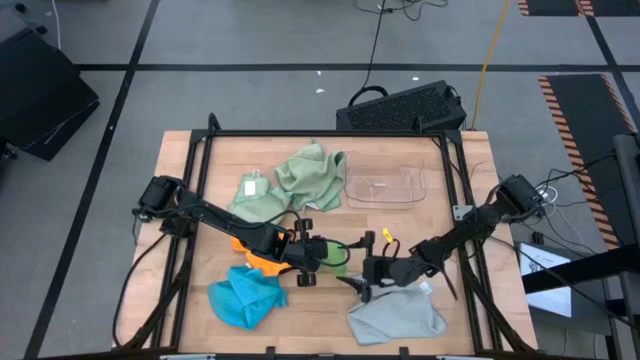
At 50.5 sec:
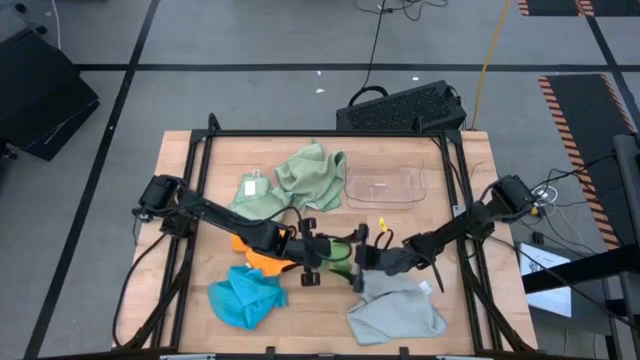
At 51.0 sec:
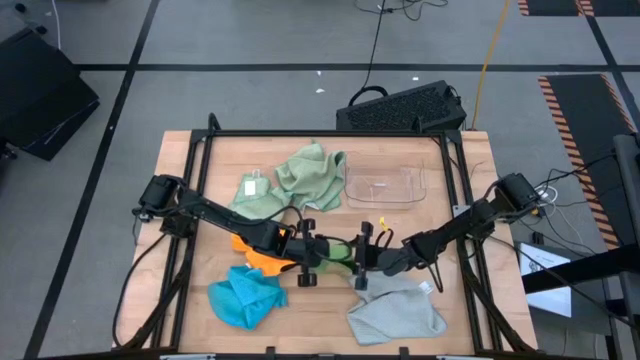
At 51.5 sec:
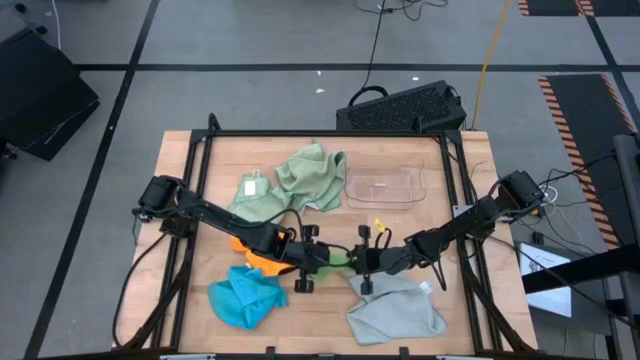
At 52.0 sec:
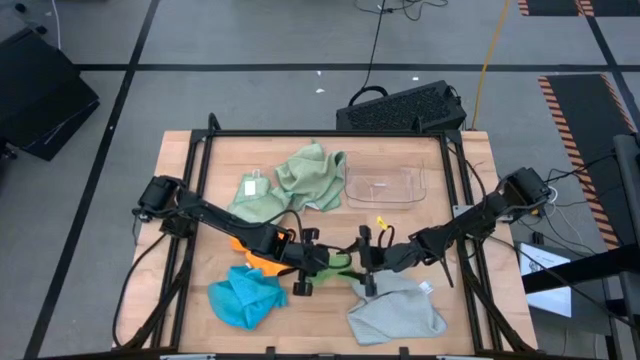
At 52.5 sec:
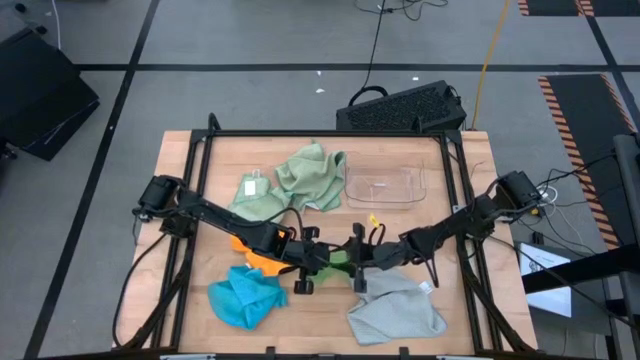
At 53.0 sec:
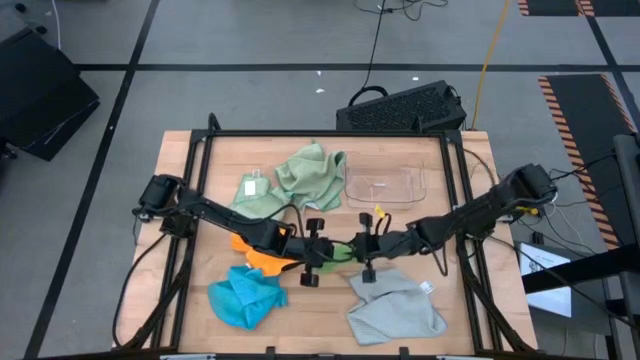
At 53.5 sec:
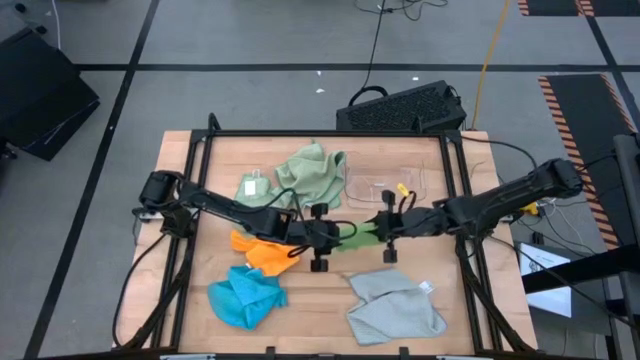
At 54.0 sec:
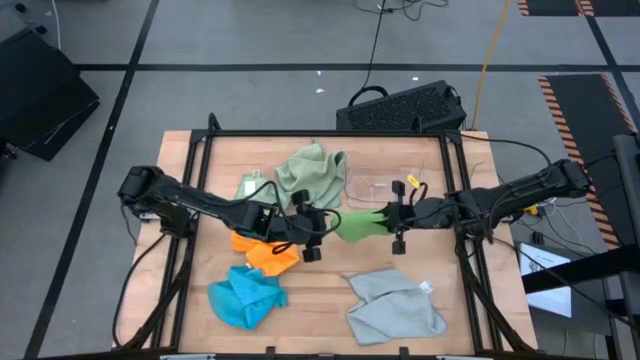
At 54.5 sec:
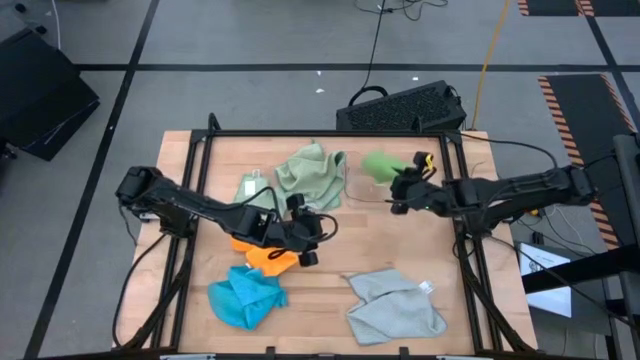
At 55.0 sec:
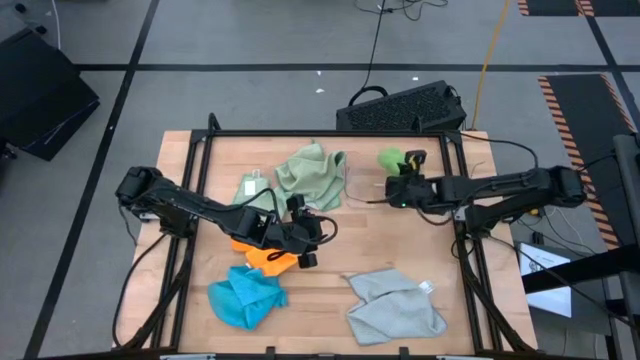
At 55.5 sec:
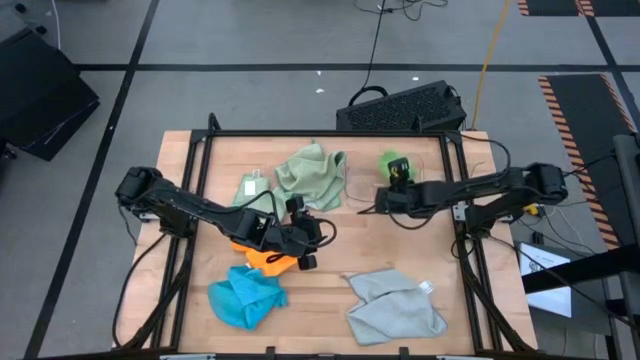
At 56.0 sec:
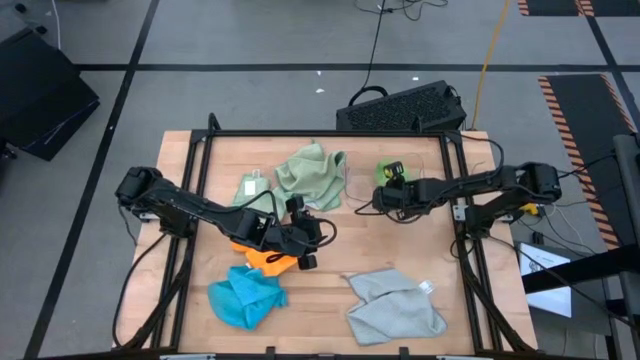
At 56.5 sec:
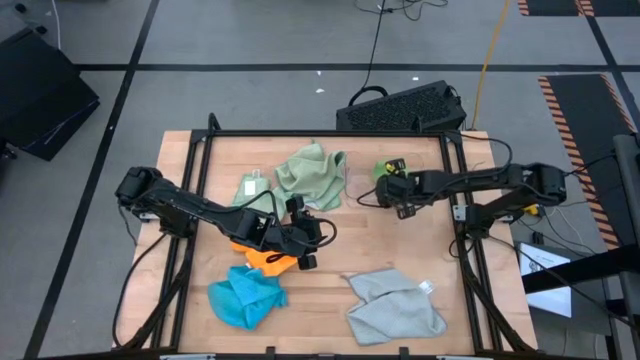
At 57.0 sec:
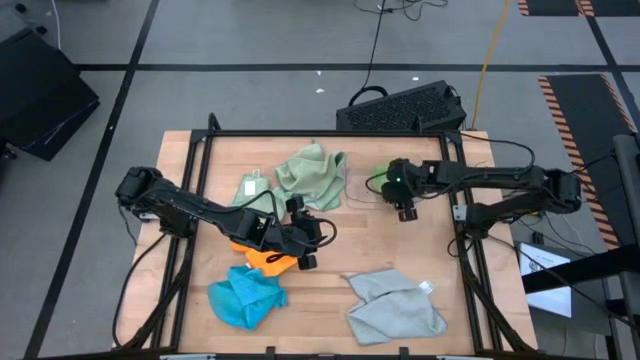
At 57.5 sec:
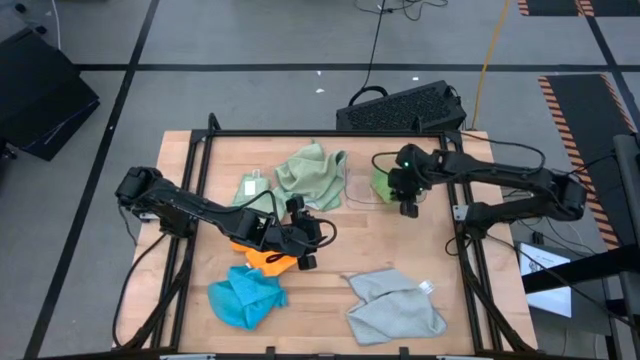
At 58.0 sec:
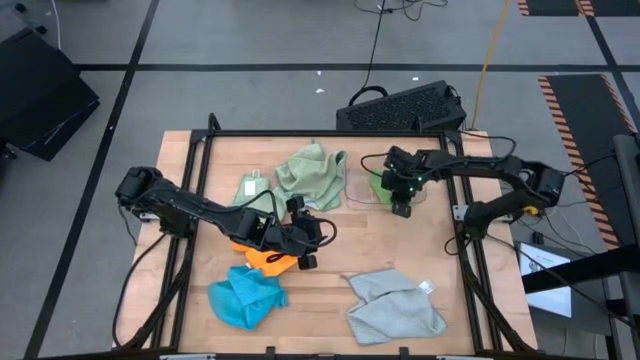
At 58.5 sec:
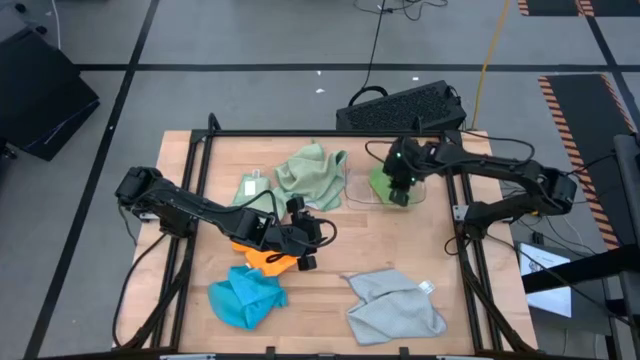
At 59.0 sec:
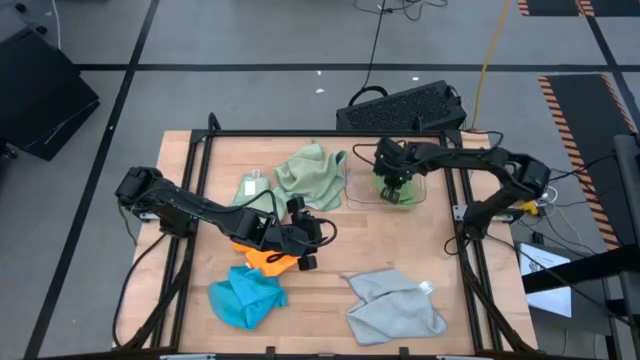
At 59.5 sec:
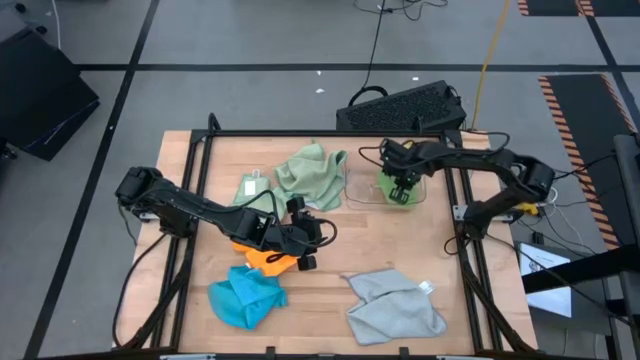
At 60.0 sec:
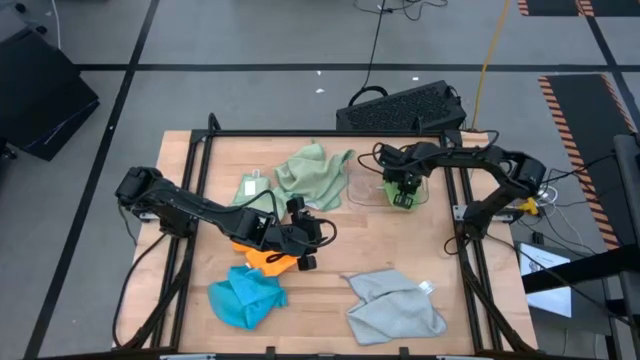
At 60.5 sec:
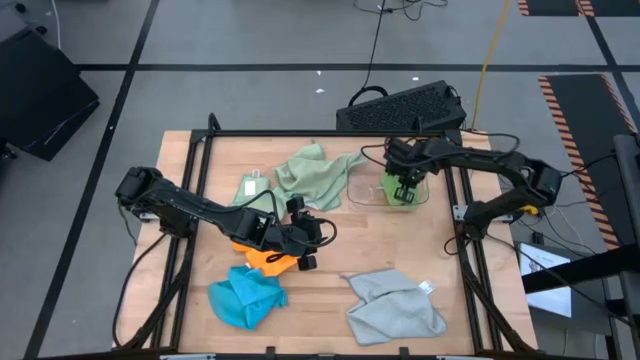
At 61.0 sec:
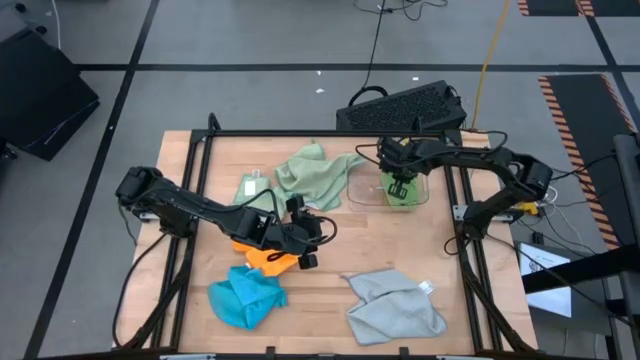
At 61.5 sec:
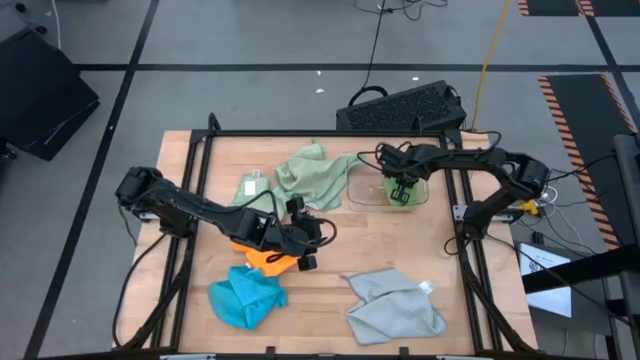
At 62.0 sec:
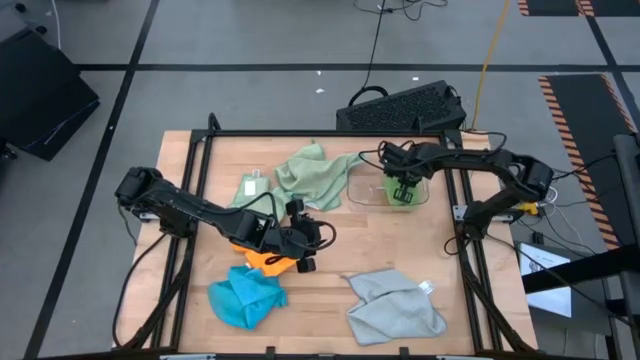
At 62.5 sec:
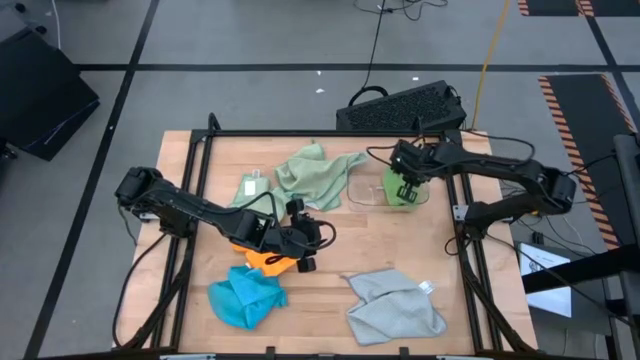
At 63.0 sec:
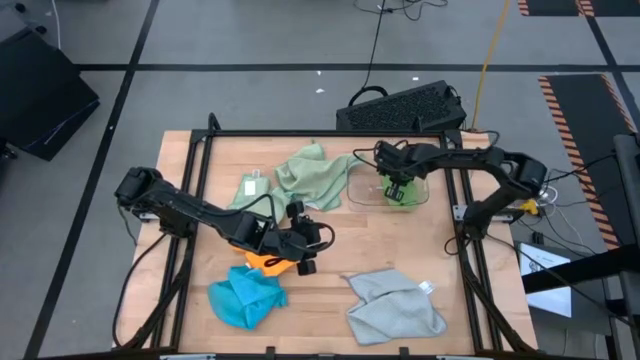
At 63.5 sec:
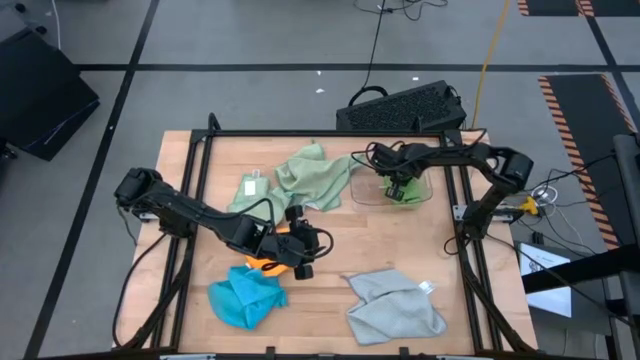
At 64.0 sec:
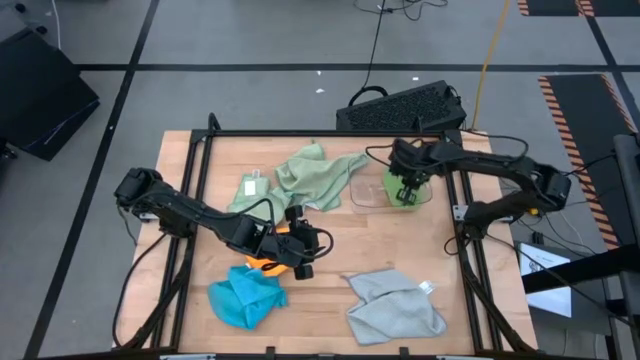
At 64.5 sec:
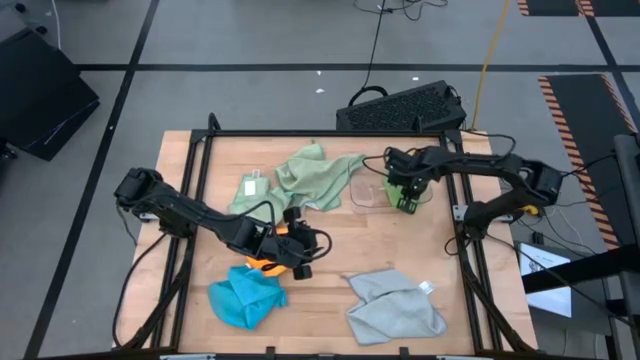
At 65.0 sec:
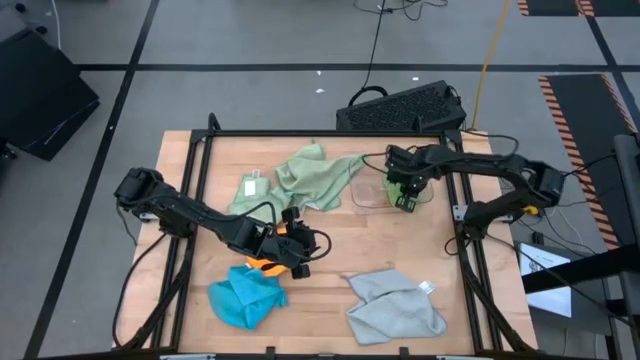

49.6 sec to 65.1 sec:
Task: Fold microfiber towels
Put the folded green microfiber cloth into the transparent bin

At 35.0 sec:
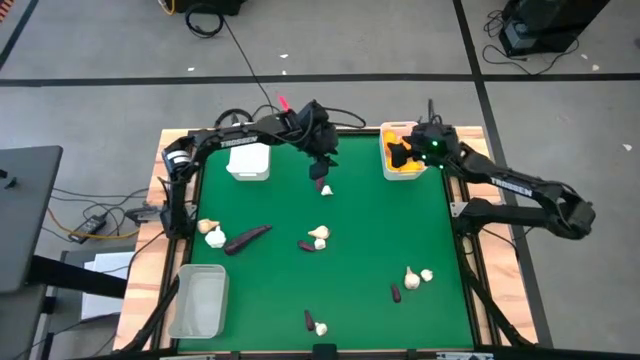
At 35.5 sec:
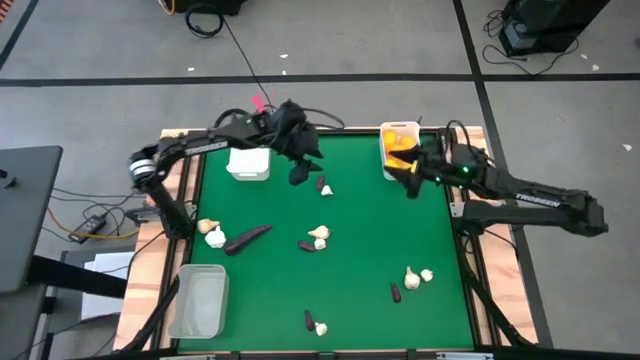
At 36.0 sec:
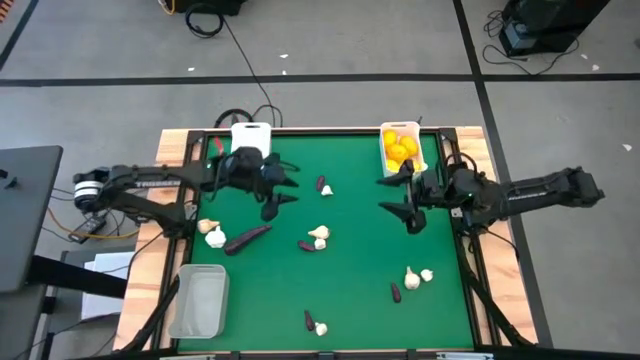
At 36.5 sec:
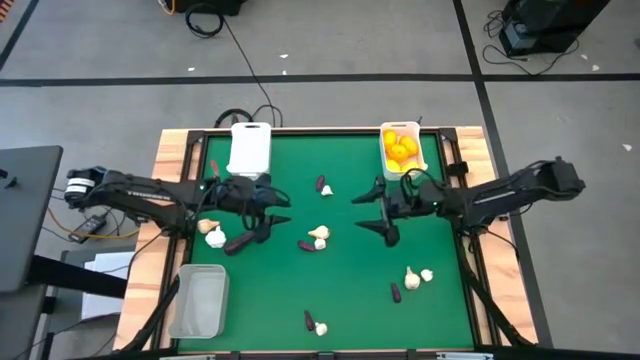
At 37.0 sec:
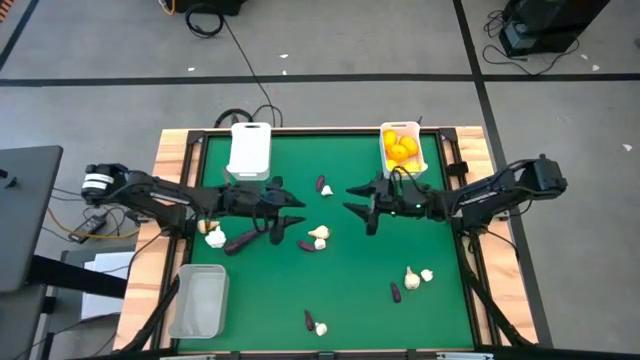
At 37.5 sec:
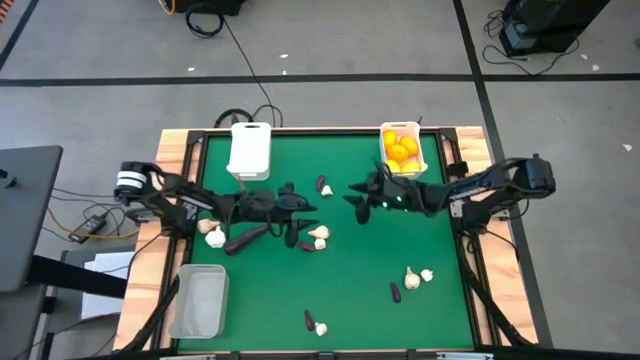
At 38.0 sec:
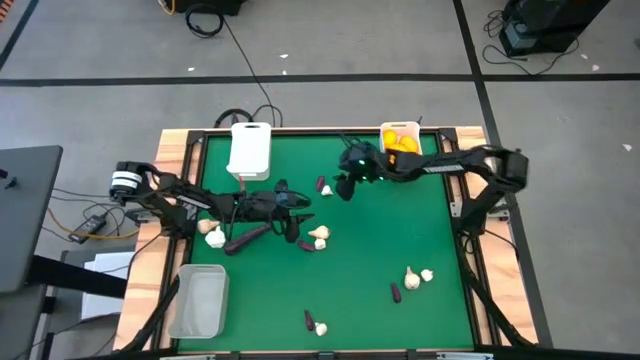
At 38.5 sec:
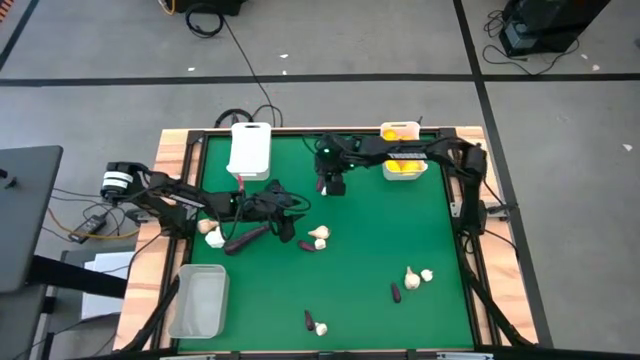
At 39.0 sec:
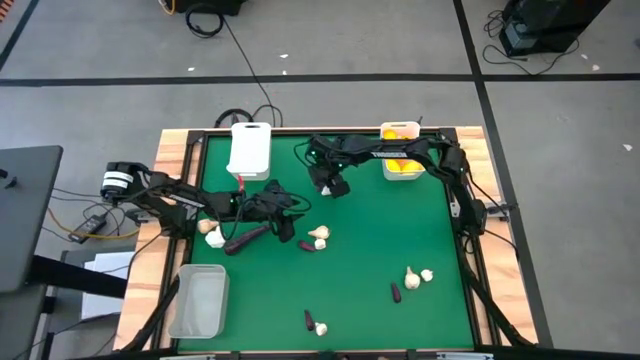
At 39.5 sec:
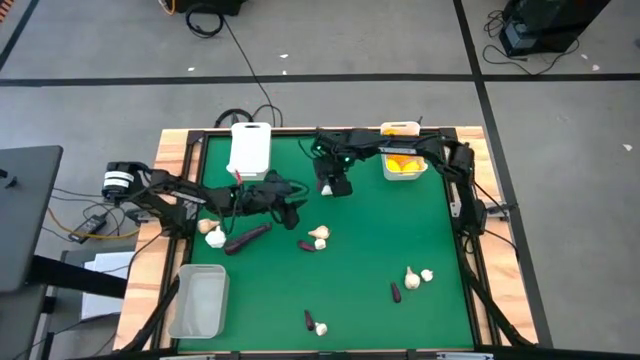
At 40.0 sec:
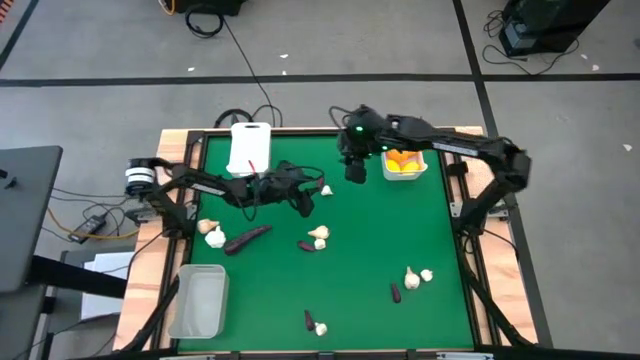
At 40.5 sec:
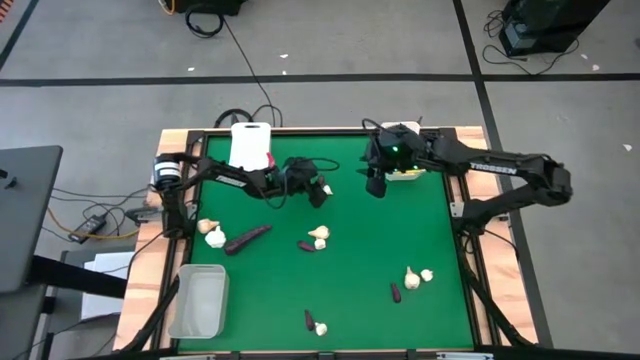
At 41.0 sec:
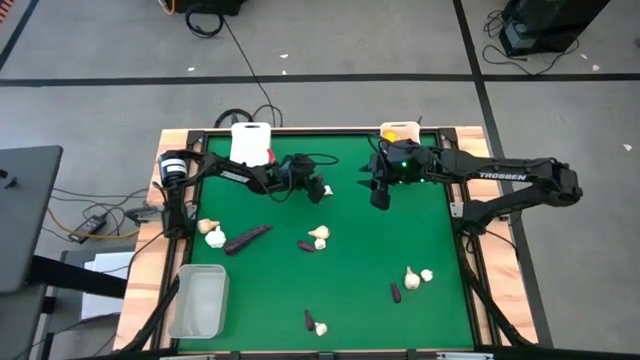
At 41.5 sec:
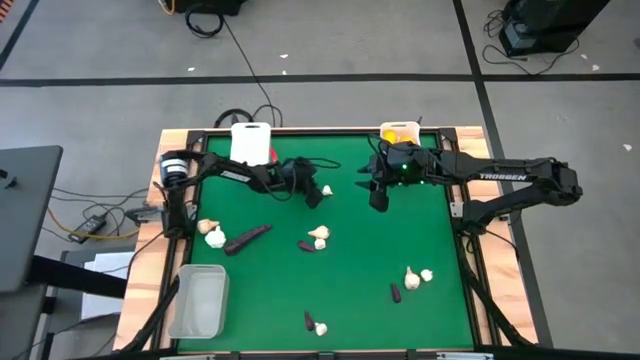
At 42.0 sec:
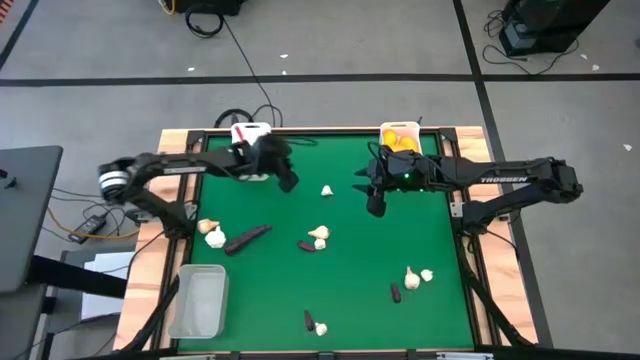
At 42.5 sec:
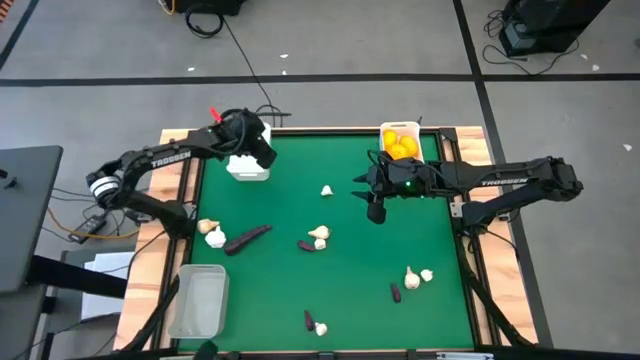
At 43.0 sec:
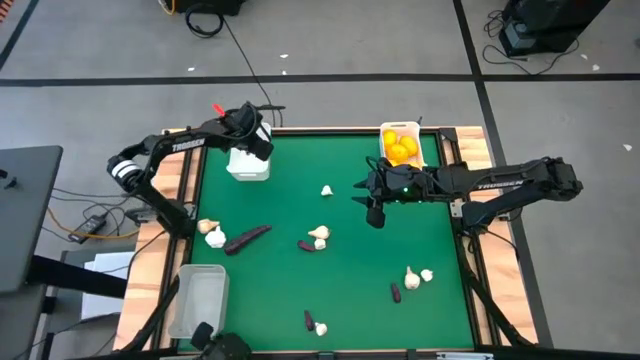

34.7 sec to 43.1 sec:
Task: Sort produce into baskets
Put the top eggplant into the left white bin
